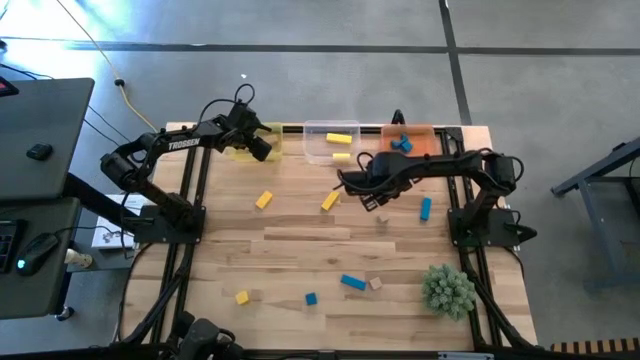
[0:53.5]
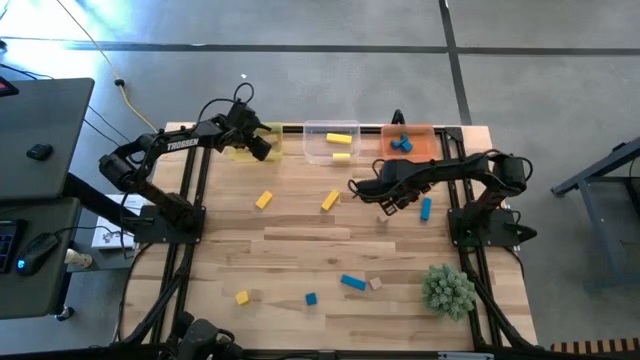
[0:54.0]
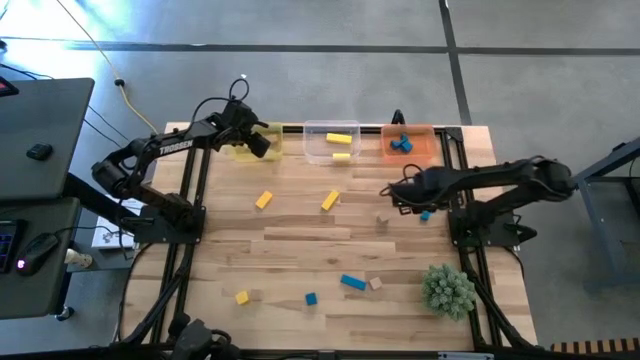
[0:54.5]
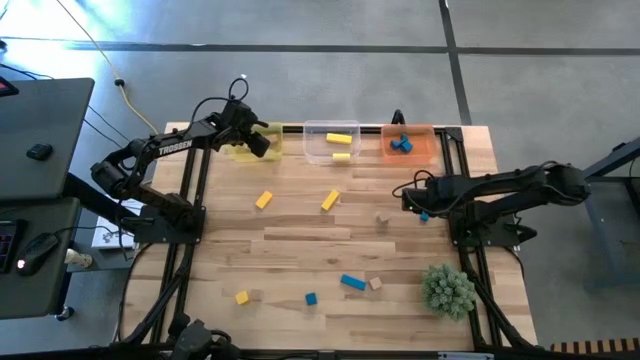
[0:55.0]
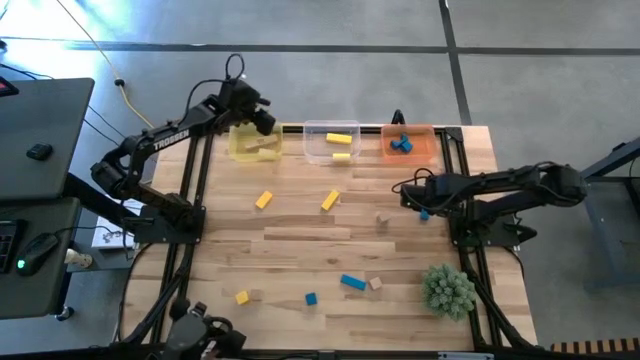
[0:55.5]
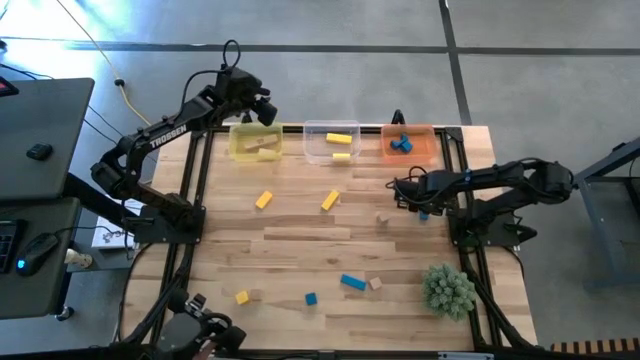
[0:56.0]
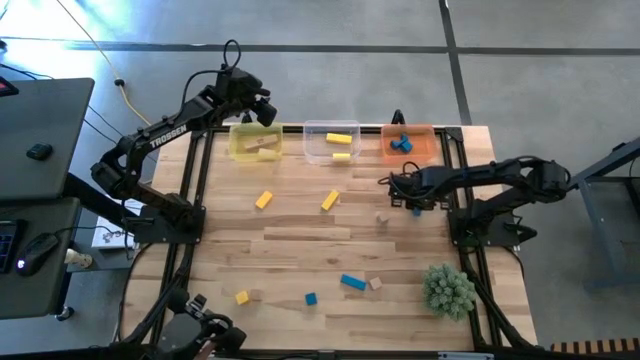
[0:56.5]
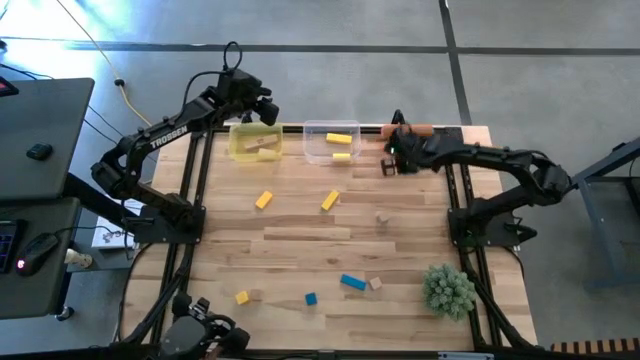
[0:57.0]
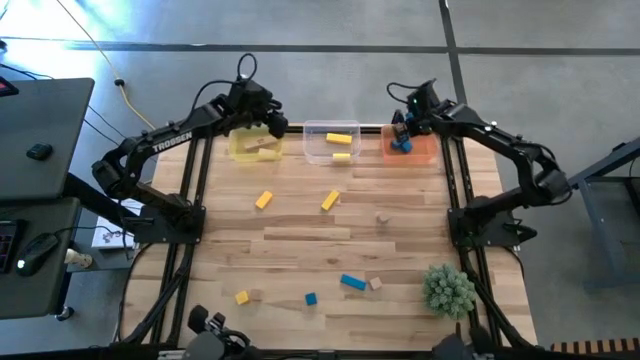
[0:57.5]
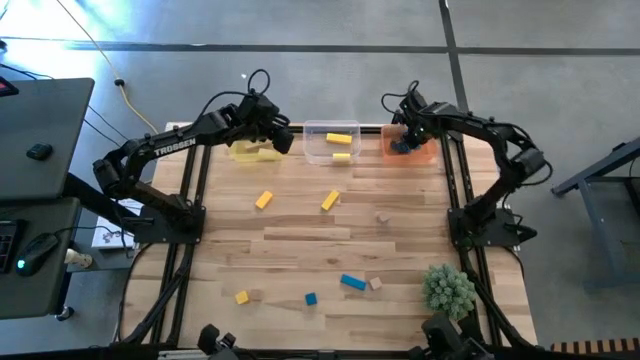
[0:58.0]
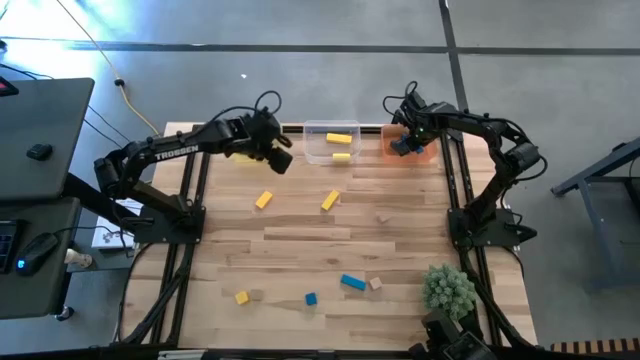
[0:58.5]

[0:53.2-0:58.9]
Task: Sort & place blocks by color
Put the right blue block into the orange bin

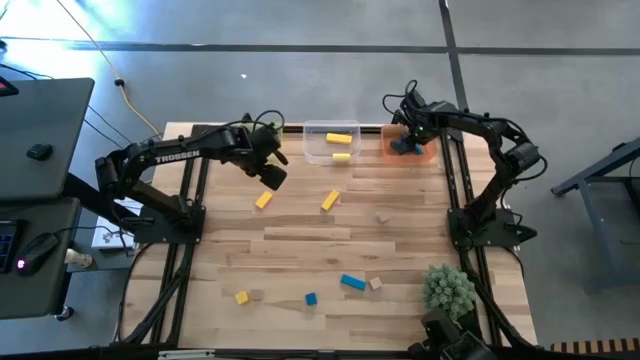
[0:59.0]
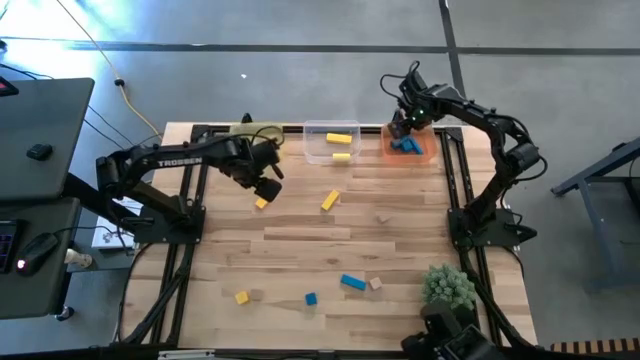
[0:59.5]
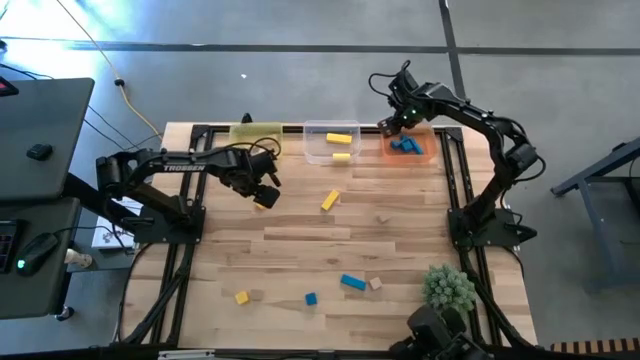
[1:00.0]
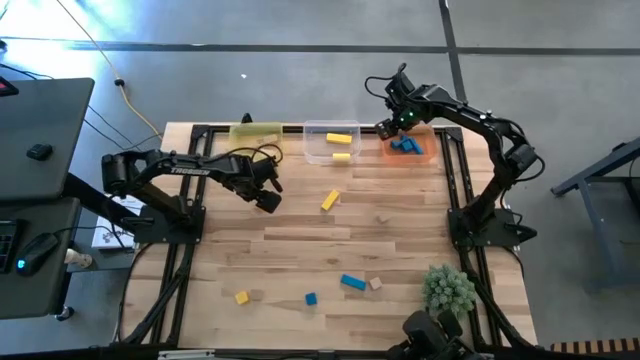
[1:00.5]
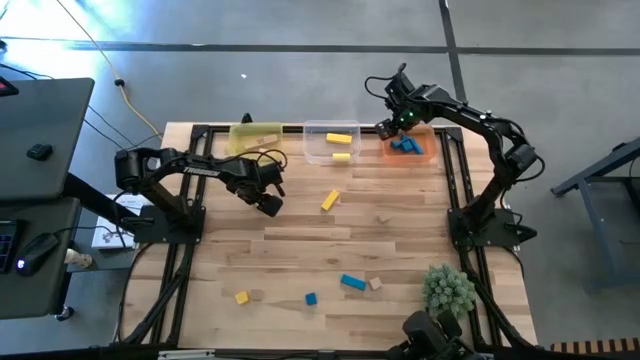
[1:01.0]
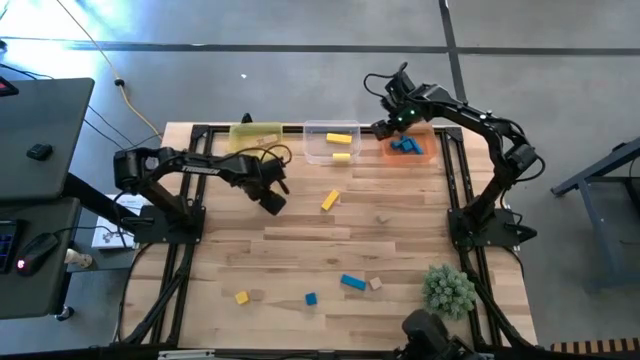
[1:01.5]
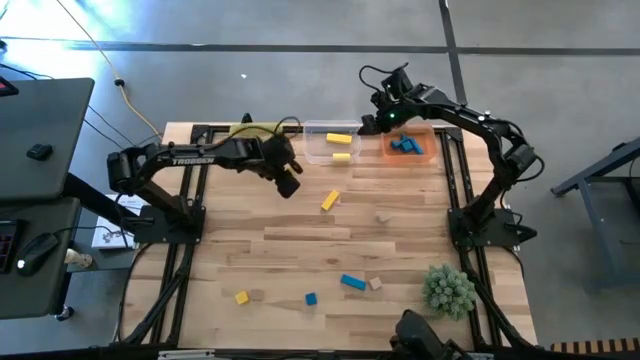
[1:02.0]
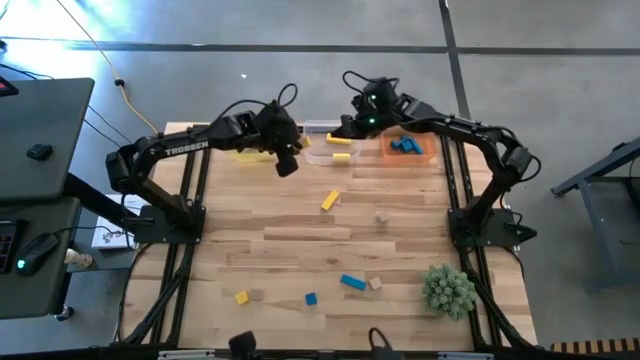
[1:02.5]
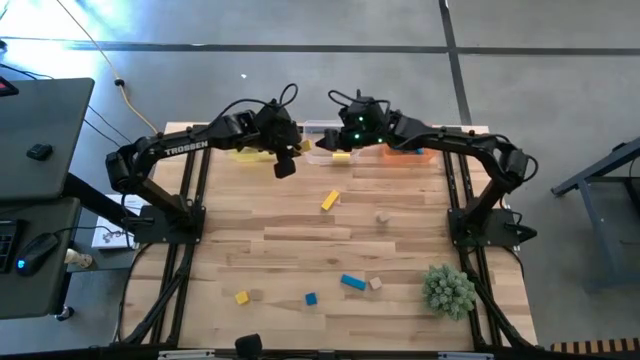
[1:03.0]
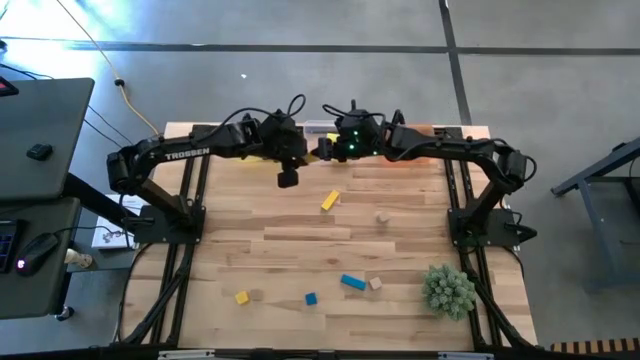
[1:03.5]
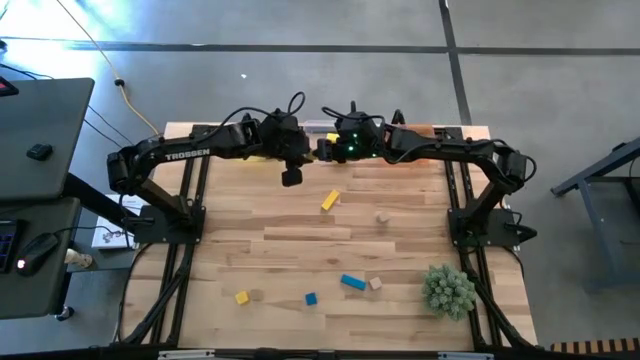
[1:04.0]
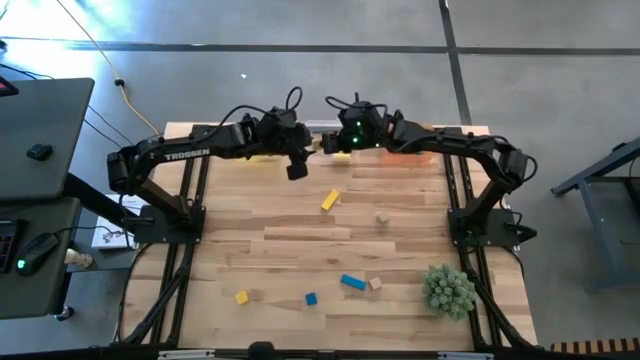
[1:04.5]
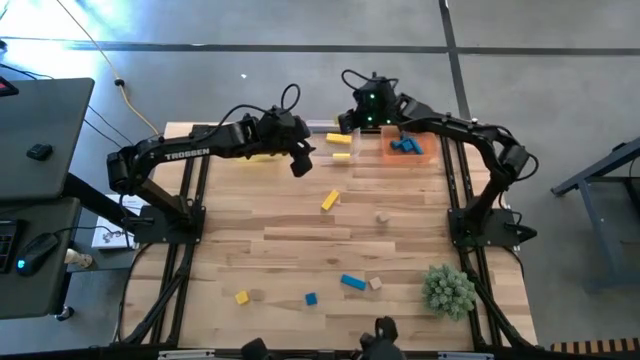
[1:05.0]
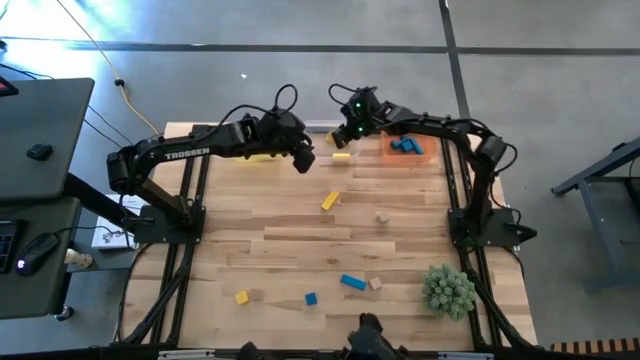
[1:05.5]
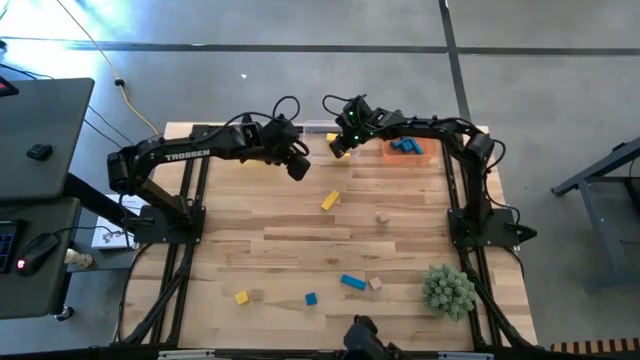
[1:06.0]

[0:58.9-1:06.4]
Put the top left yellow block into the transparent bin

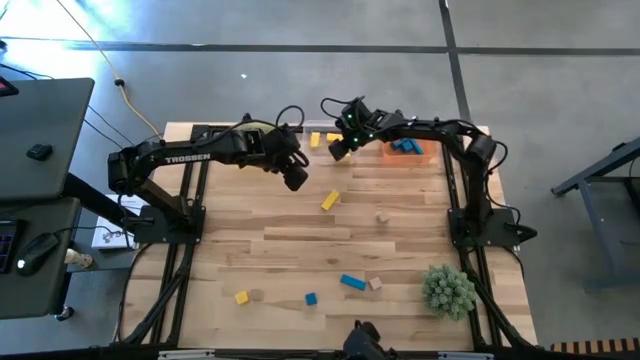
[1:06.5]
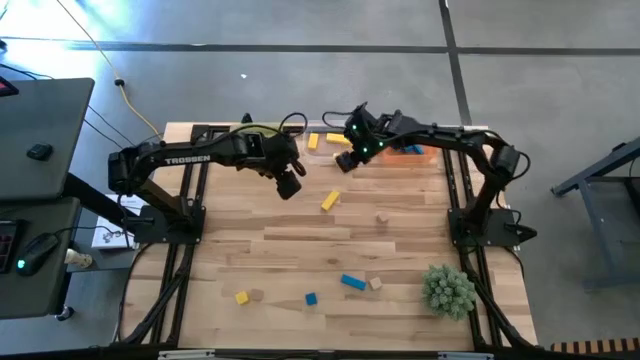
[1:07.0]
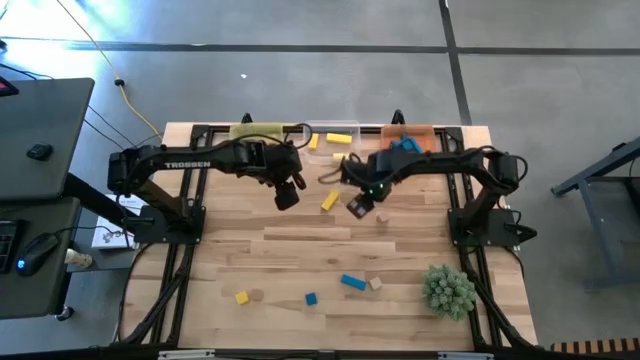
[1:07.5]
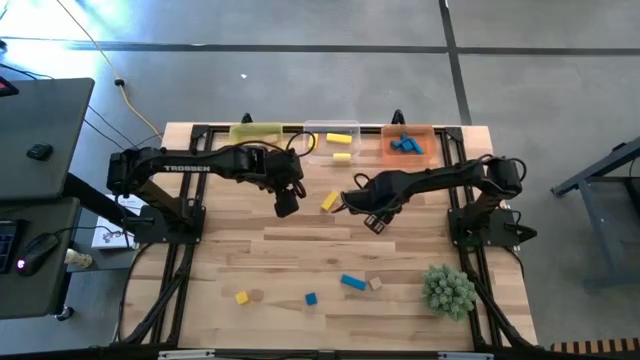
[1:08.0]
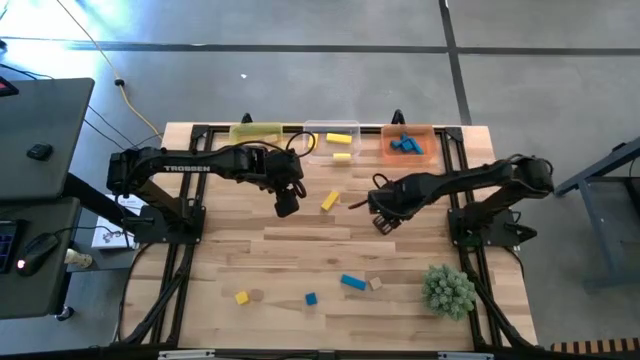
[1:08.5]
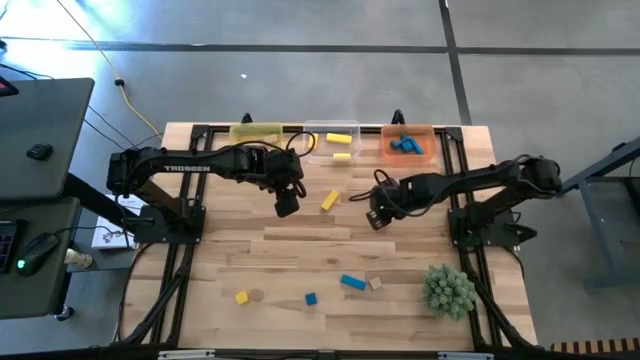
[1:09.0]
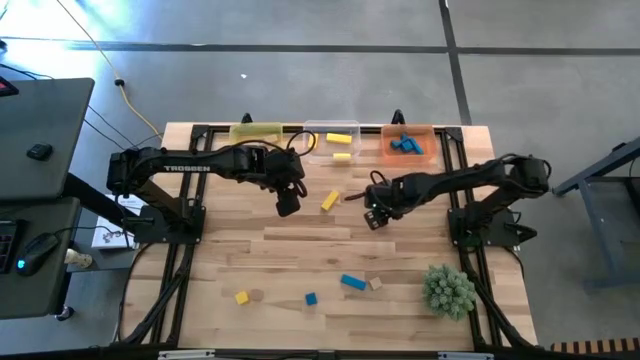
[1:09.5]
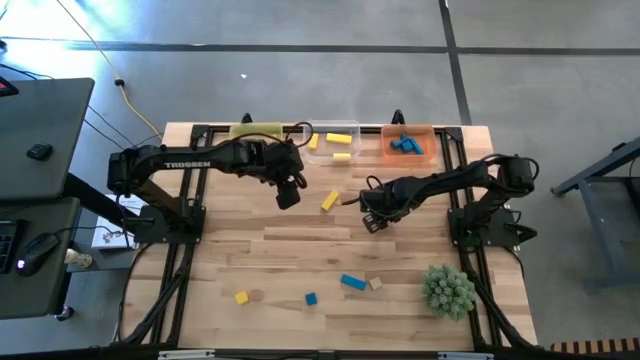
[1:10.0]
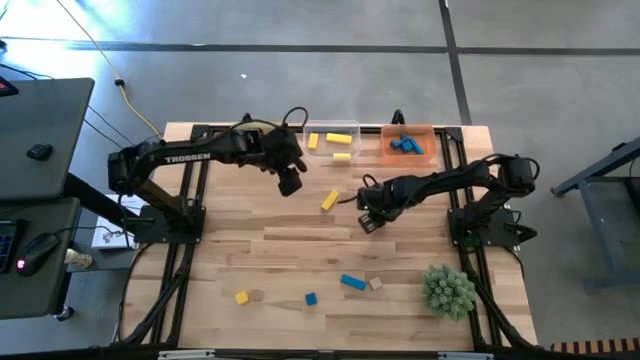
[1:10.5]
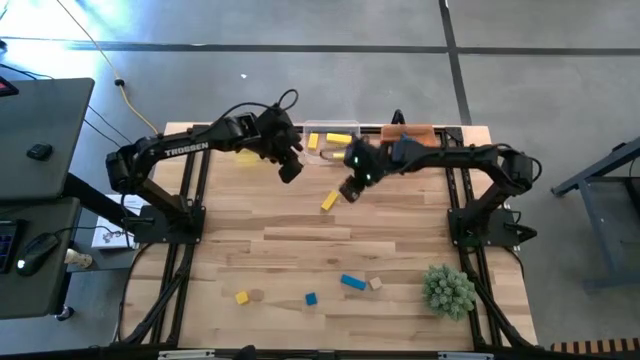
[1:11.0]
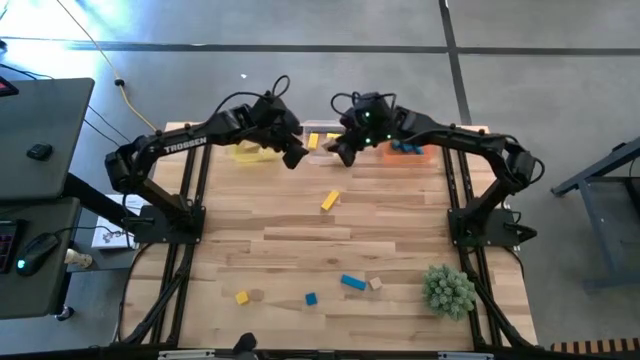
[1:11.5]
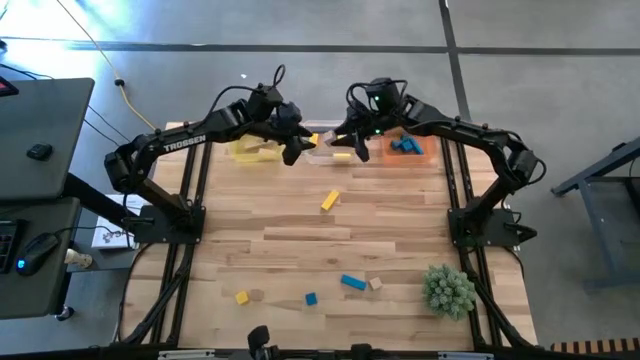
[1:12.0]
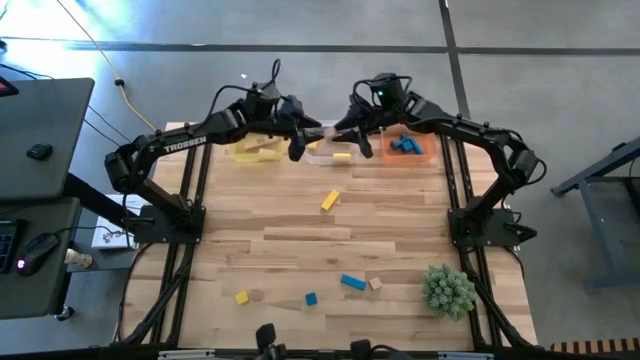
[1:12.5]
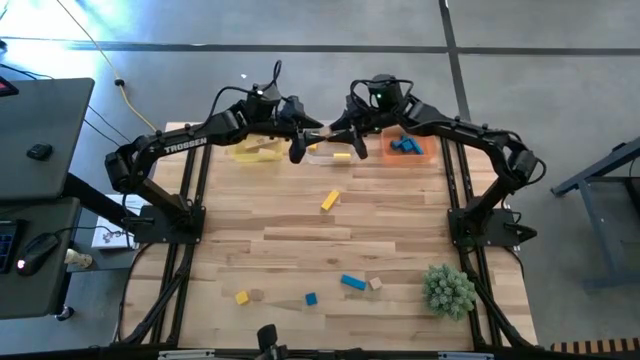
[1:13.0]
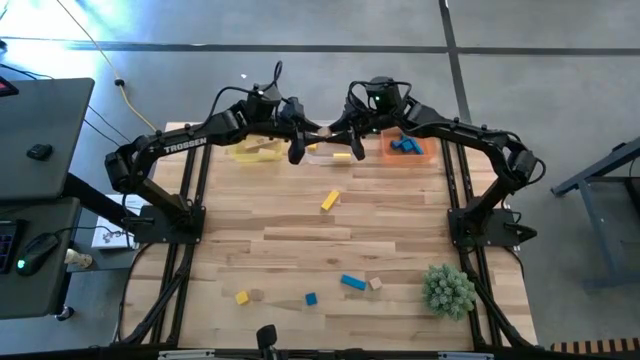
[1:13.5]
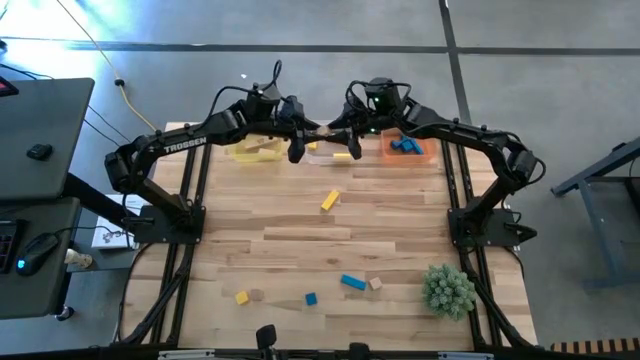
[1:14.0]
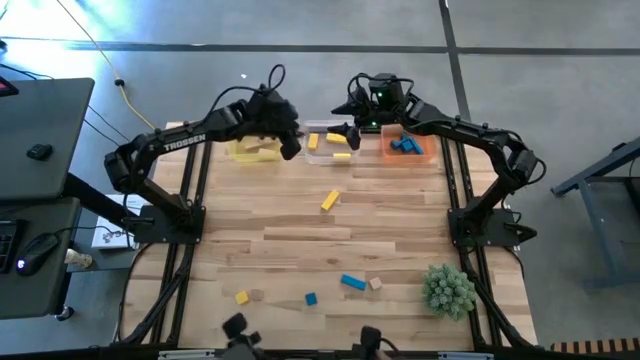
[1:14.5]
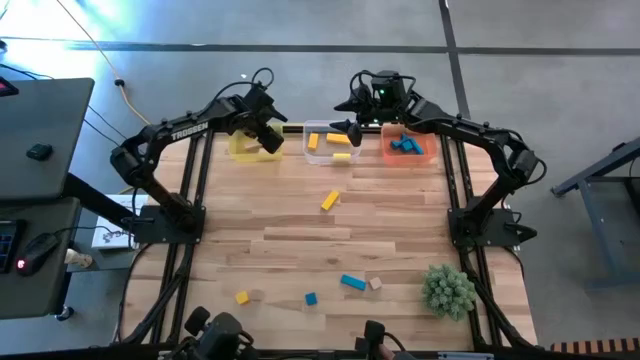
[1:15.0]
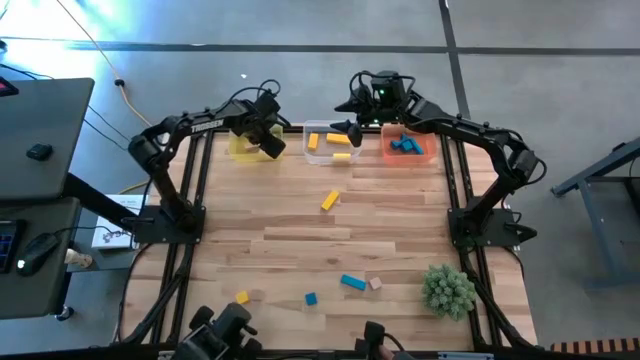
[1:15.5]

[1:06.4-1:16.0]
Put the top brown block into the yellow bin
